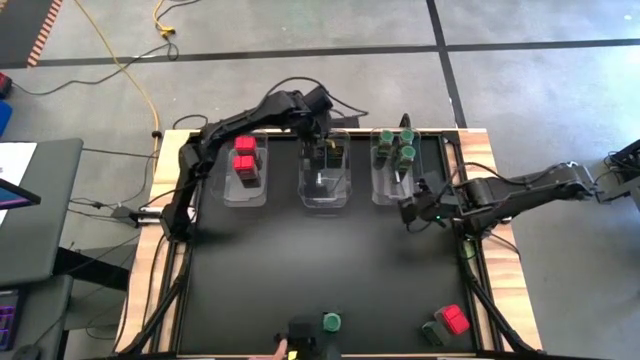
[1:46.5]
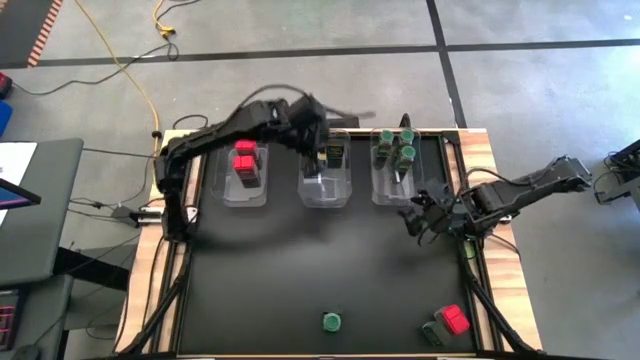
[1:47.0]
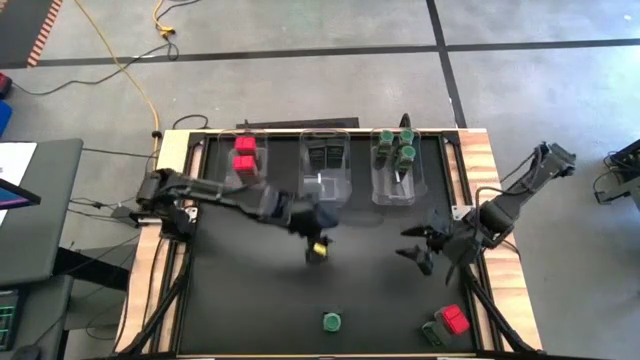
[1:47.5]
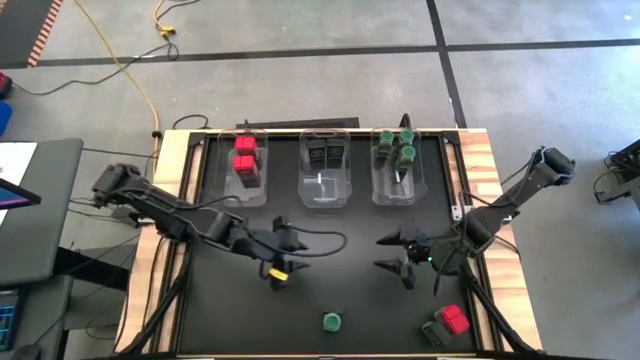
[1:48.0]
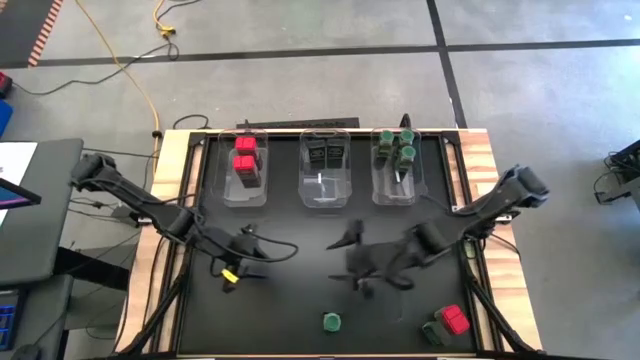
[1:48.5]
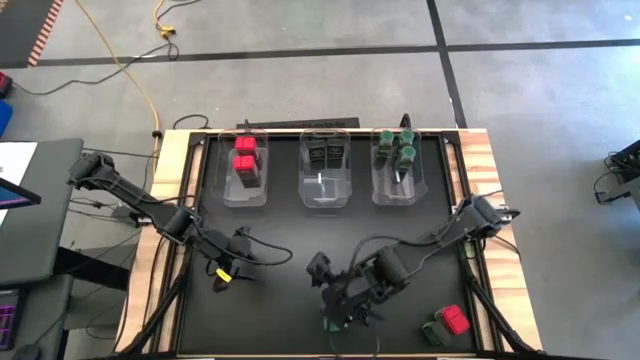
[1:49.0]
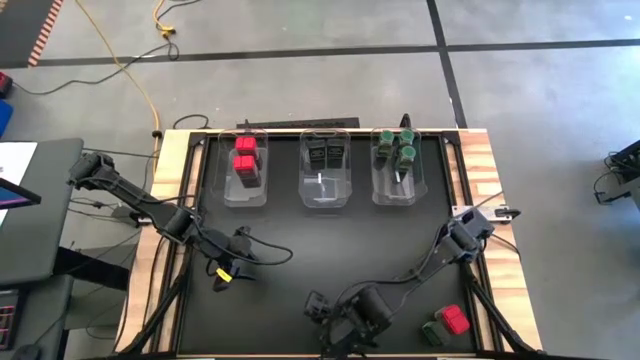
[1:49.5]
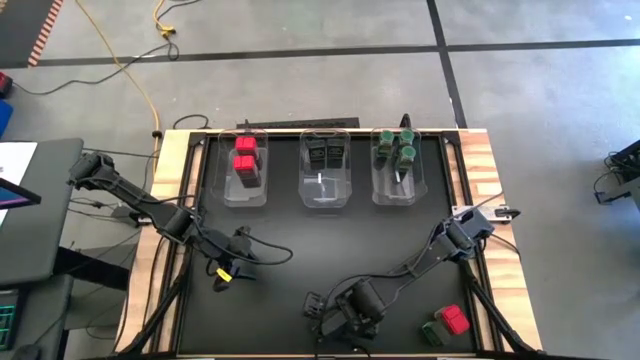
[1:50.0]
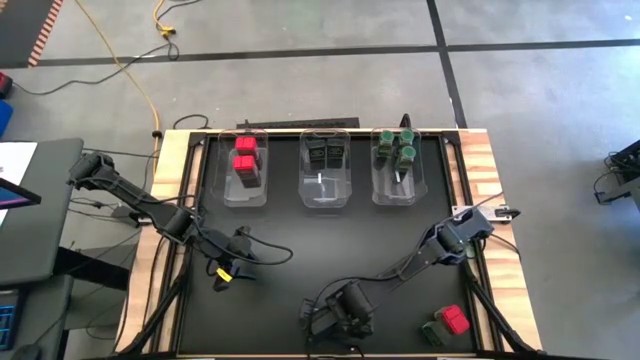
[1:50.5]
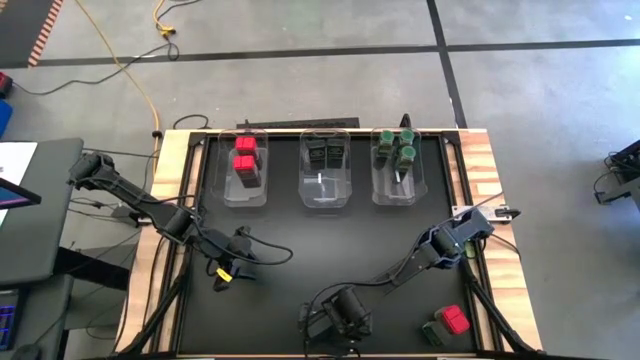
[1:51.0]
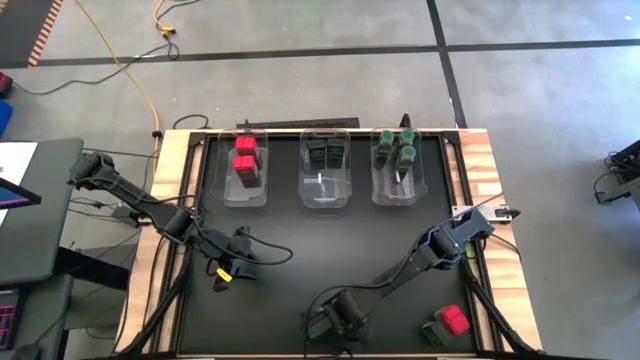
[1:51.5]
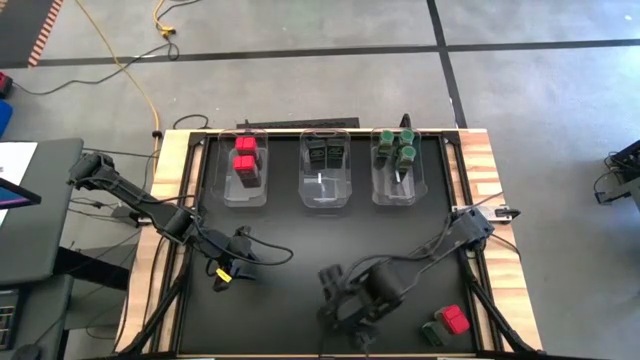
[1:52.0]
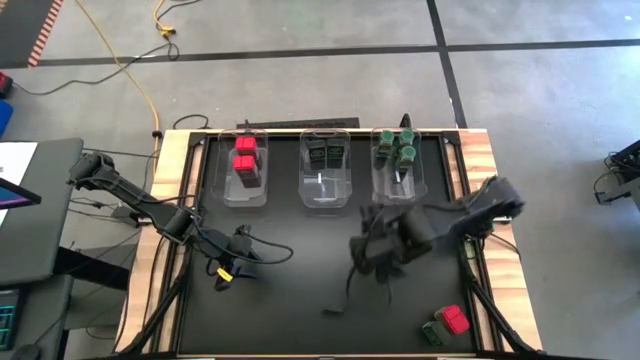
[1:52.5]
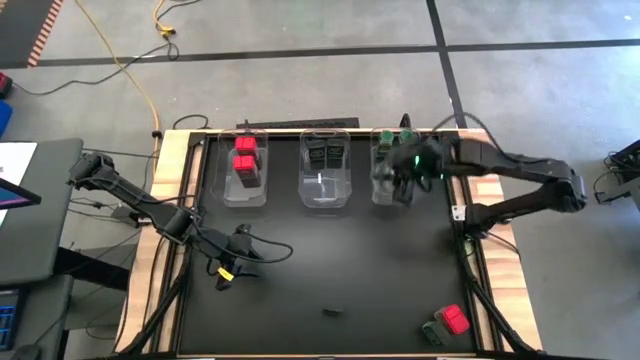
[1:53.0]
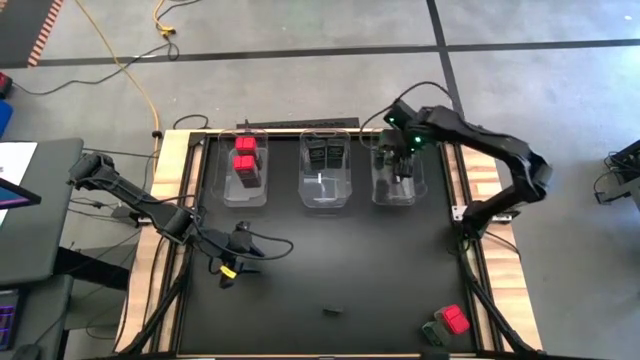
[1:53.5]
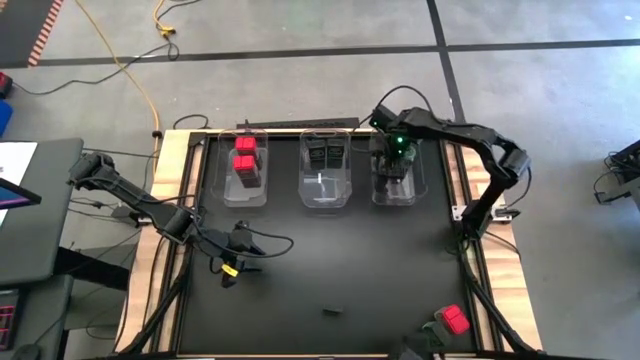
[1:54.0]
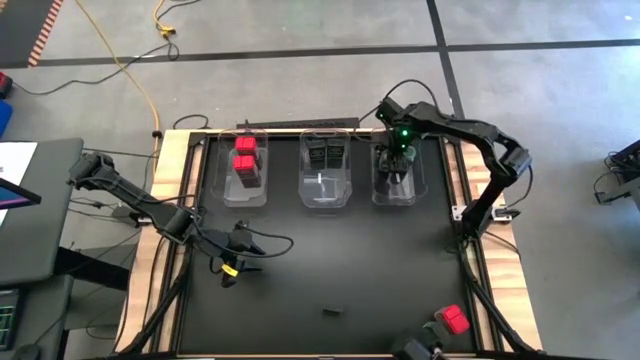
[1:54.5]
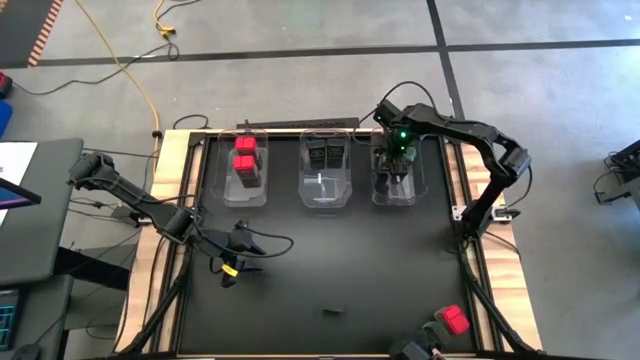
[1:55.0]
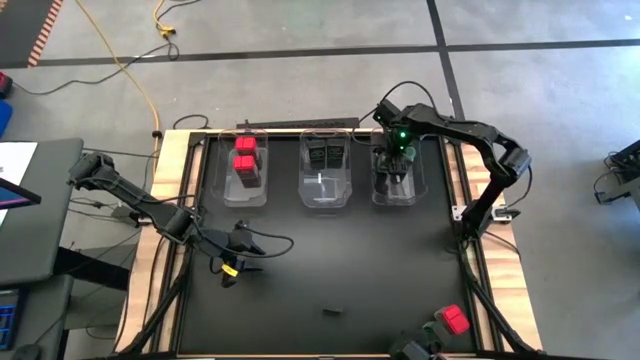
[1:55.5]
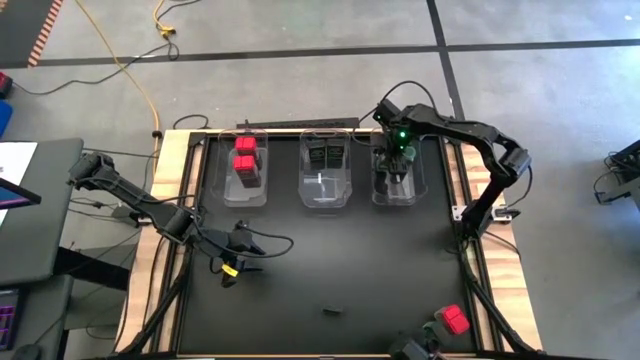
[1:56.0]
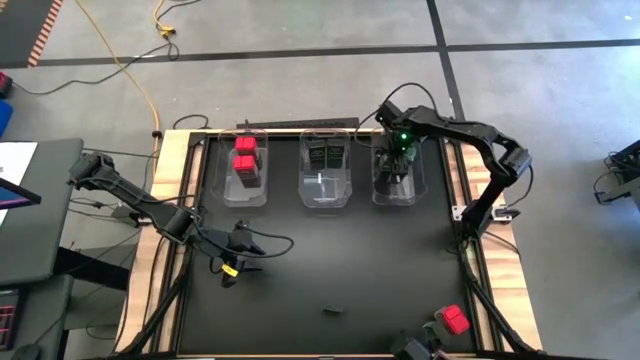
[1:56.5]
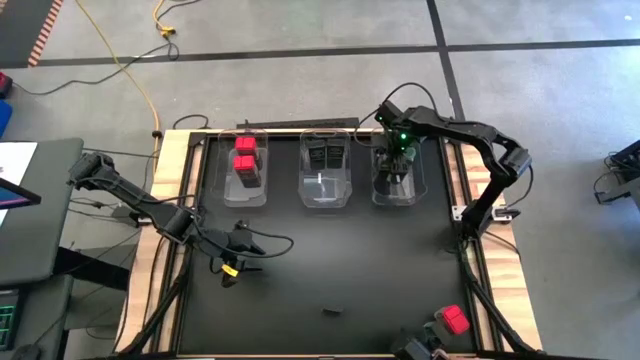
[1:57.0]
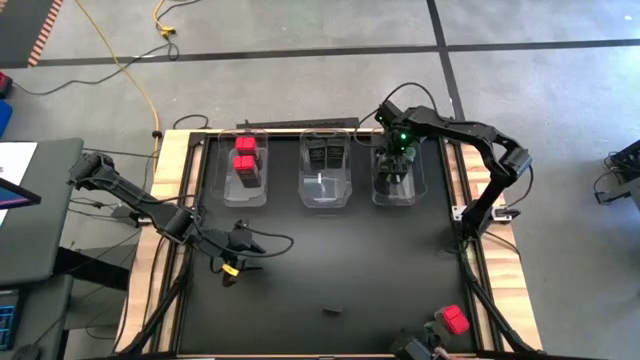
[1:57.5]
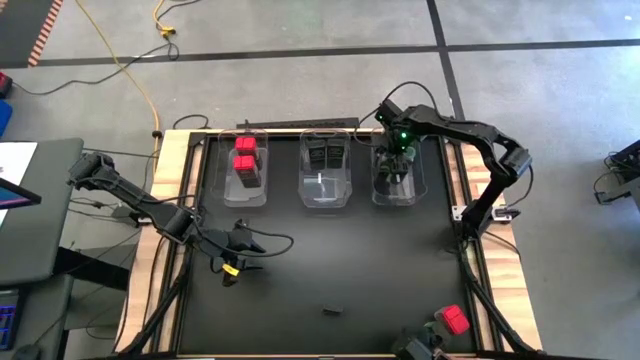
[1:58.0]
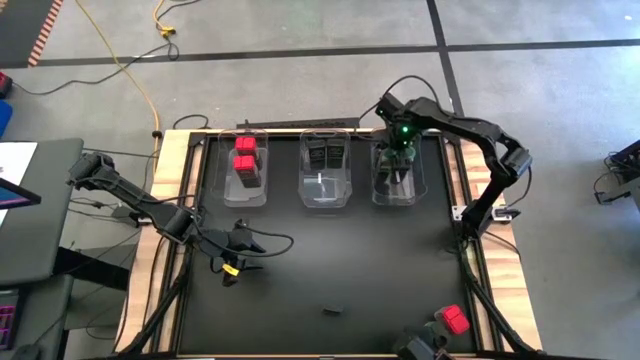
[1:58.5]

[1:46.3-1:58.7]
Task: Sort spices by type
Put the green seasoning bottle into the right transparent bin

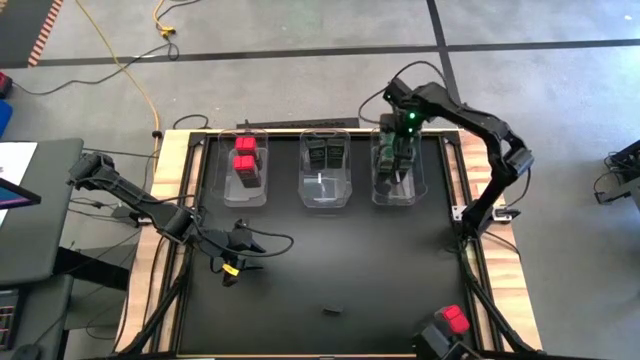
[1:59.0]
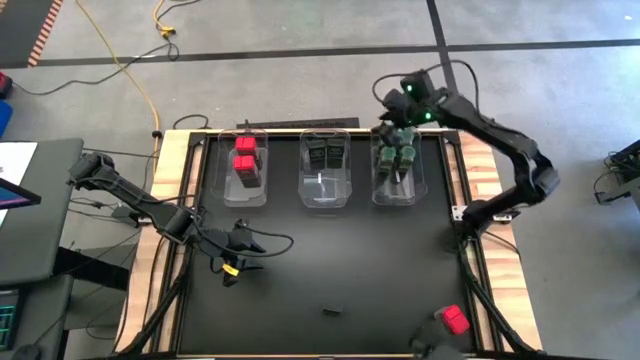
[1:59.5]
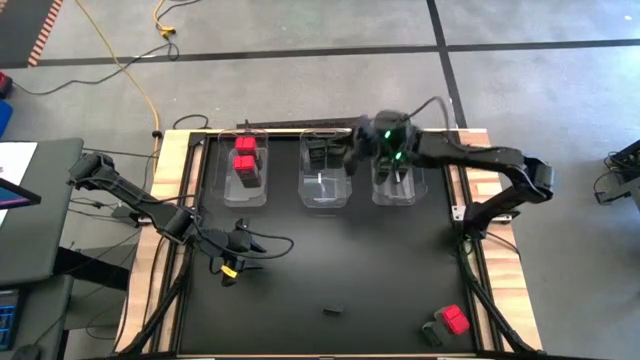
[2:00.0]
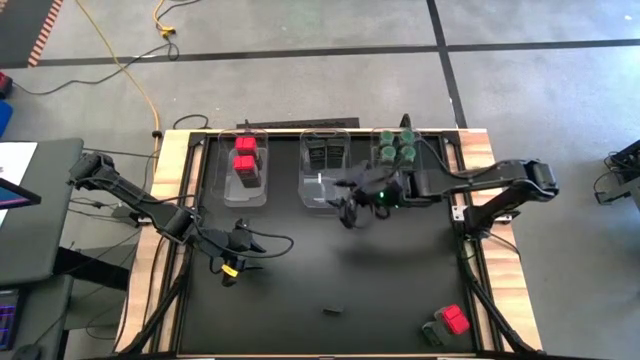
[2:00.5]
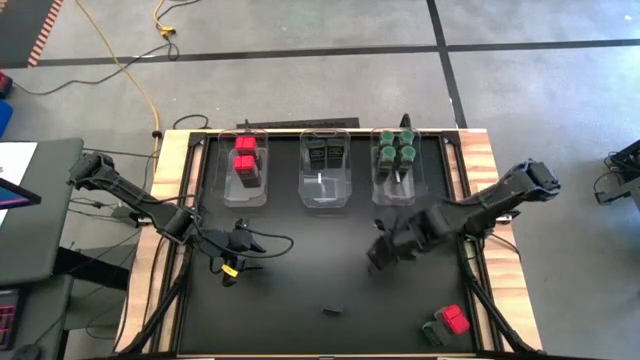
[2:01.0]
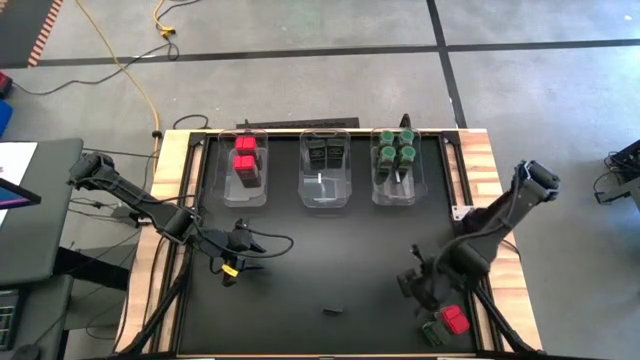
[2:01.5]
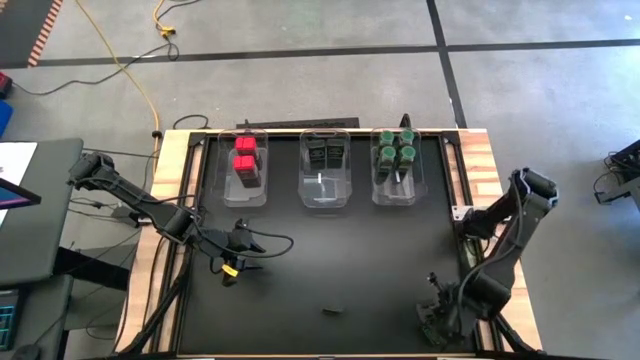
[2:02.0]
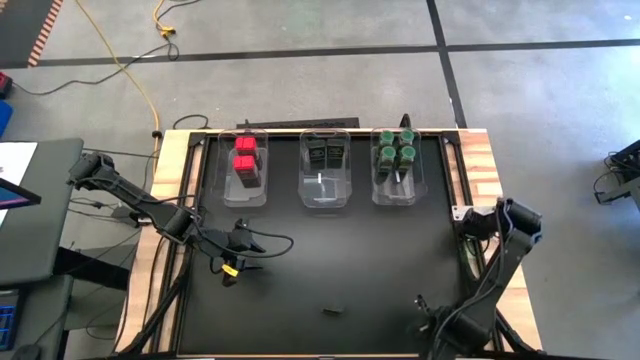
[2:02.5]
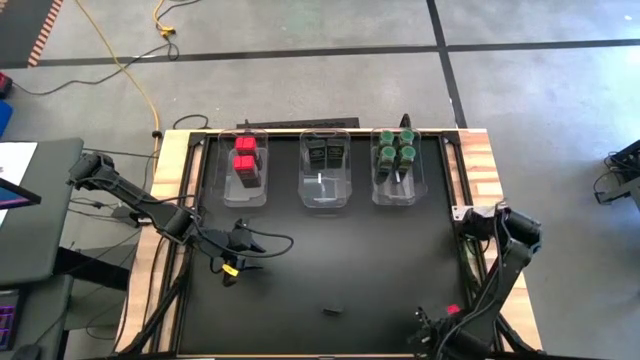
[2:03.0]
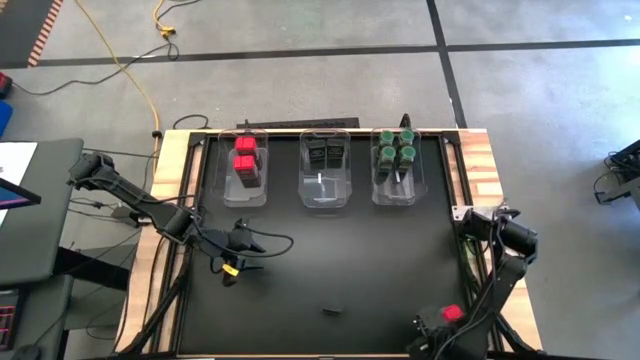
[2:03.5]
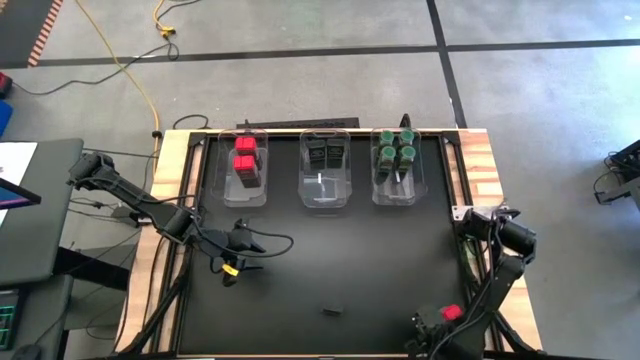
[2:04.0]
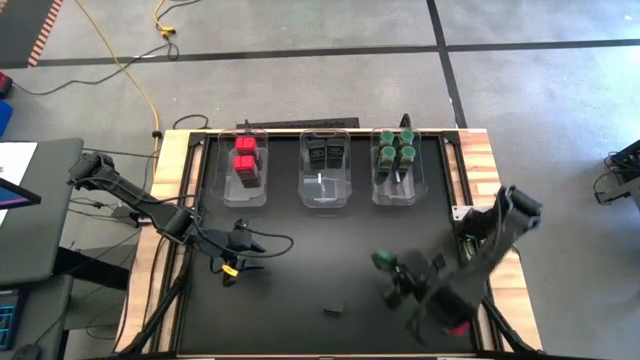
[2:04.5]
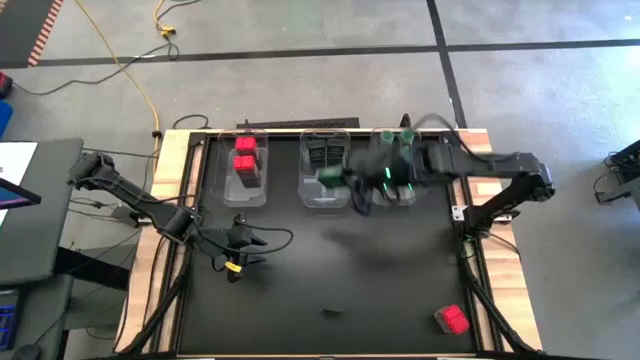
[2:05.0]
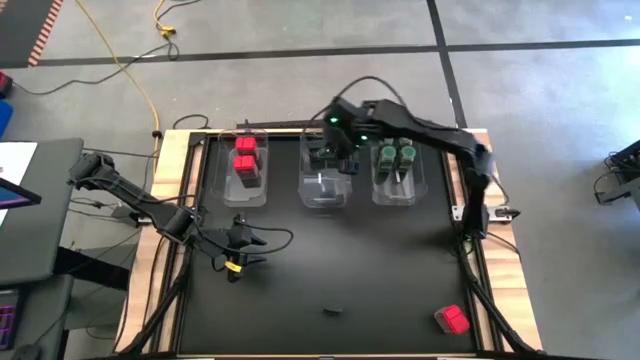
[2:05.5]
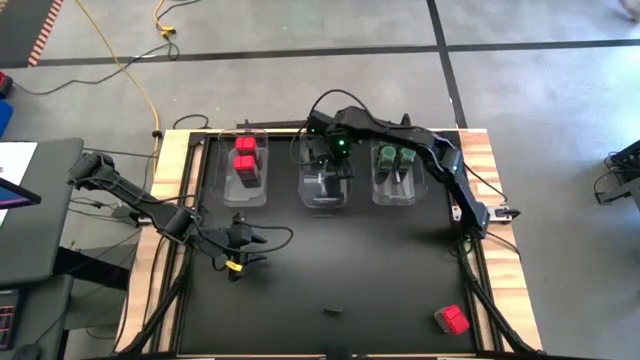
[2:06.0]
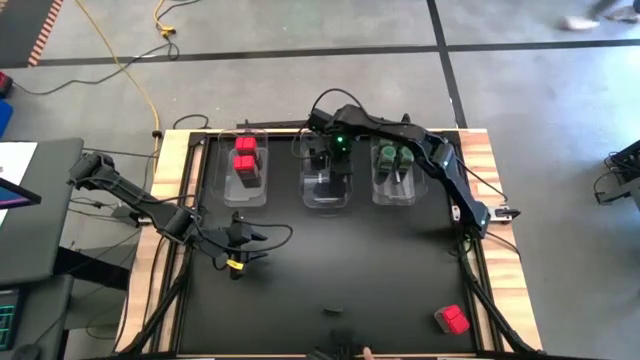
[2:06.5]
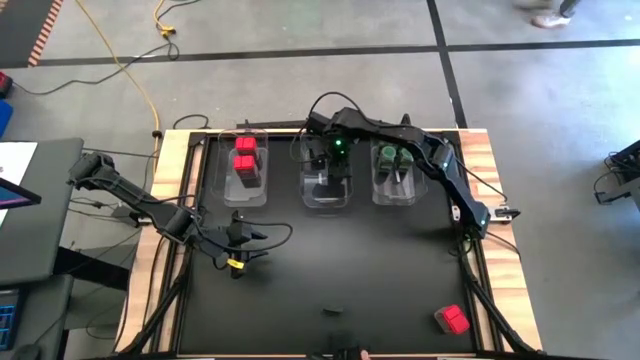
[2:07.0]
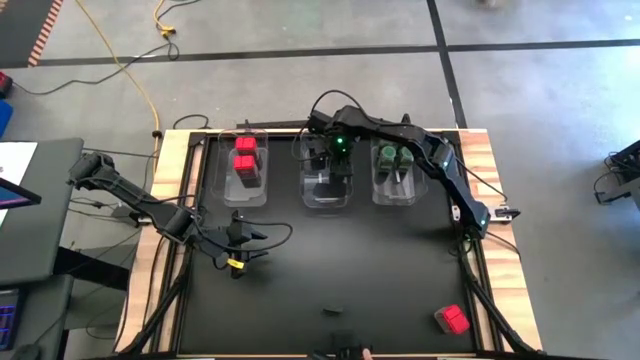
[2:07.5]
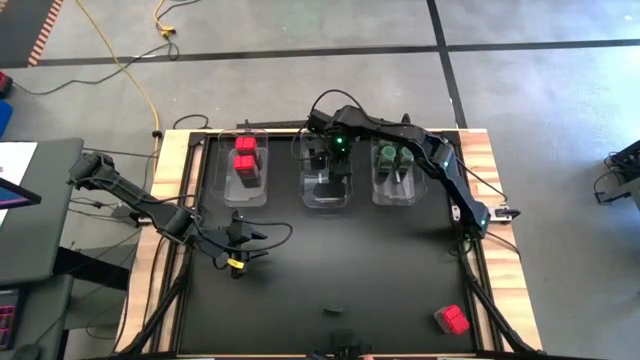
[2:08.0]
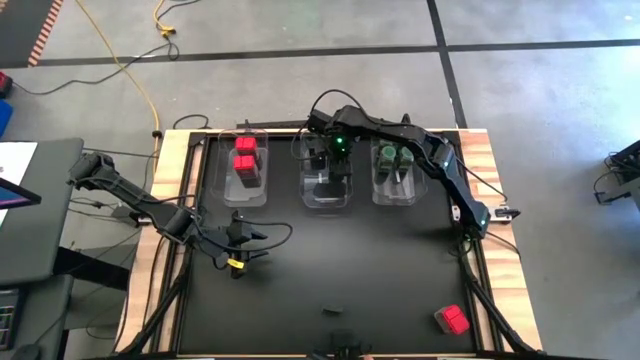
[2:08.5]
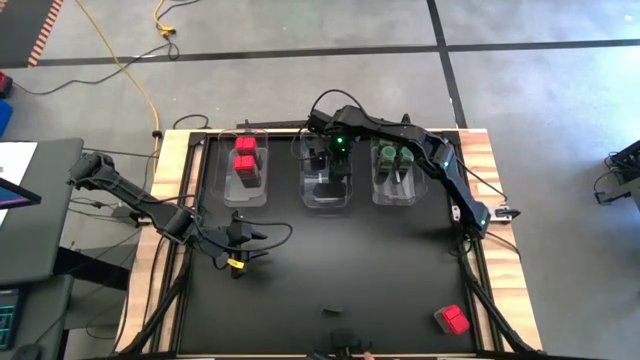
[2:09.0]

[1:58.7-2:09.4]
Put the black seasoning can into the middle transparent bin
